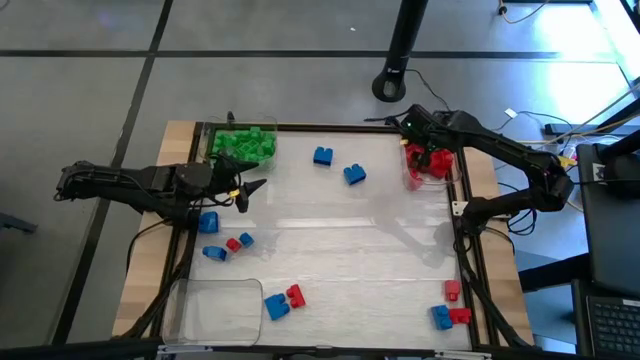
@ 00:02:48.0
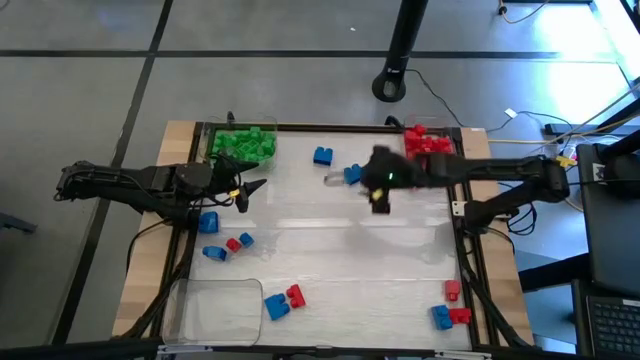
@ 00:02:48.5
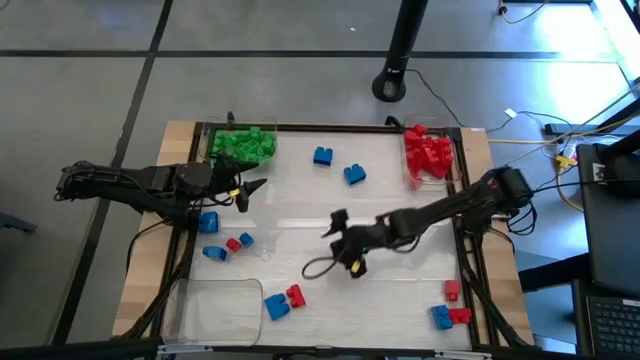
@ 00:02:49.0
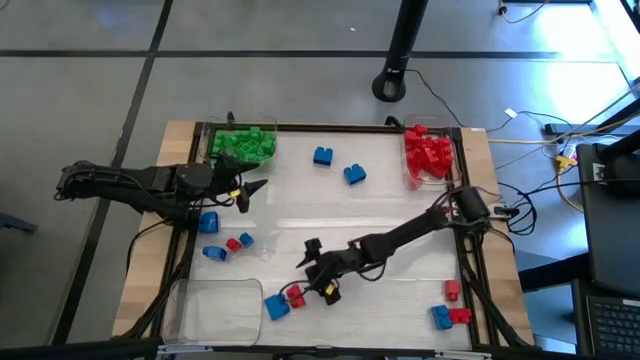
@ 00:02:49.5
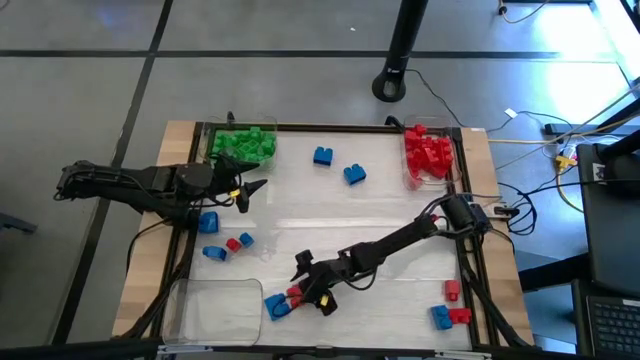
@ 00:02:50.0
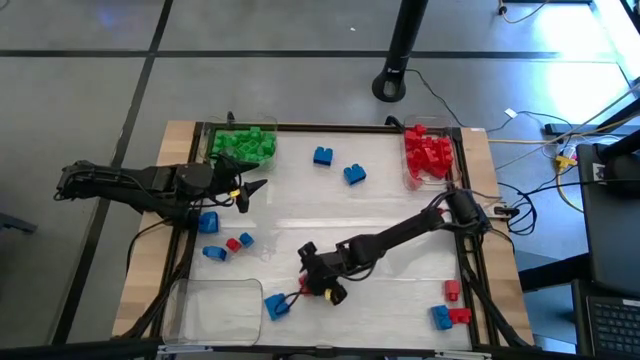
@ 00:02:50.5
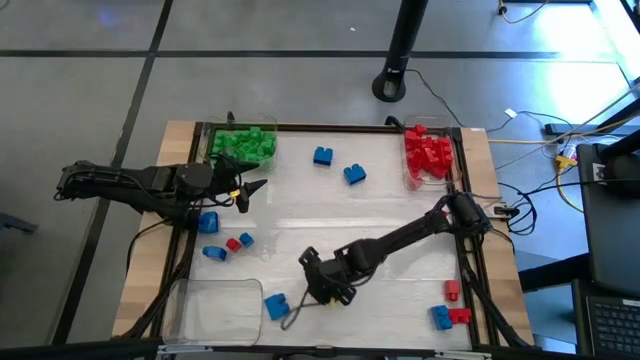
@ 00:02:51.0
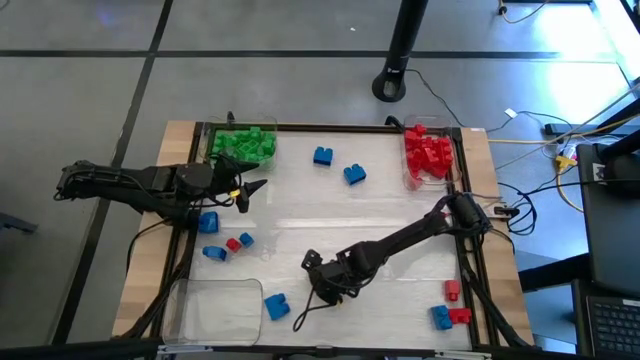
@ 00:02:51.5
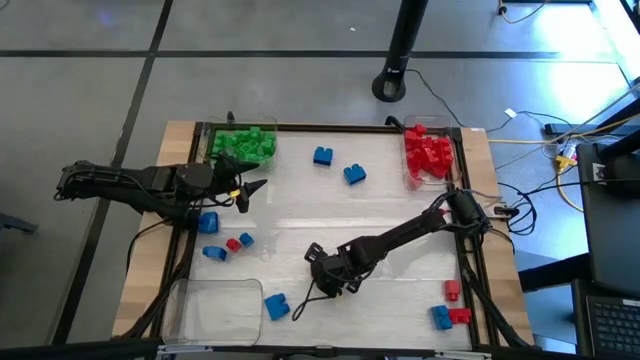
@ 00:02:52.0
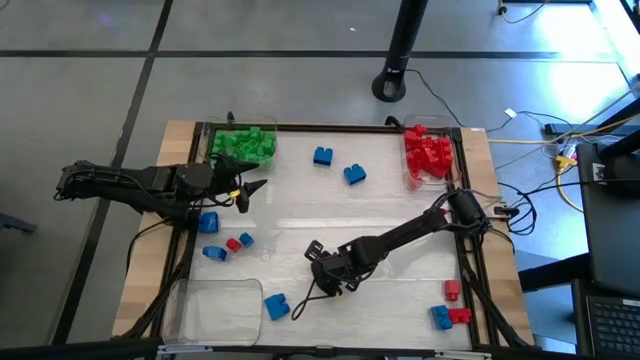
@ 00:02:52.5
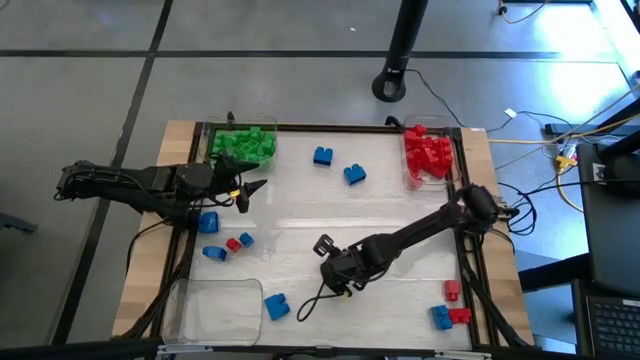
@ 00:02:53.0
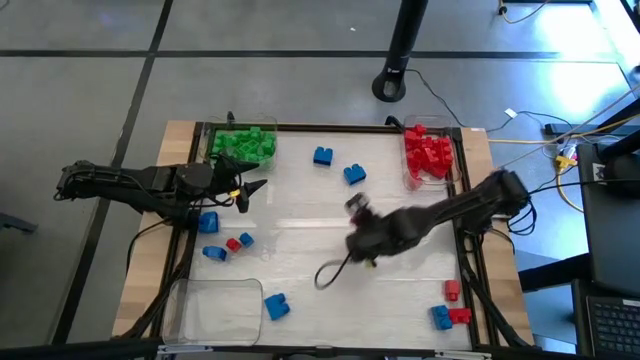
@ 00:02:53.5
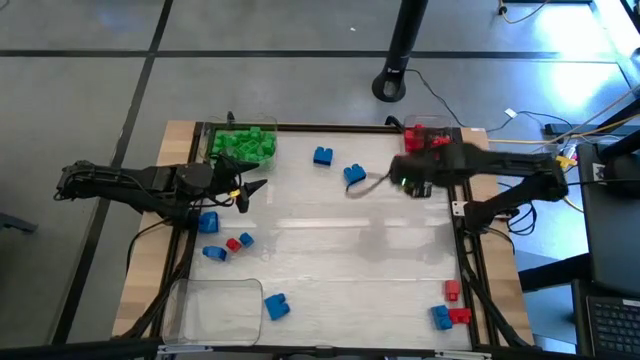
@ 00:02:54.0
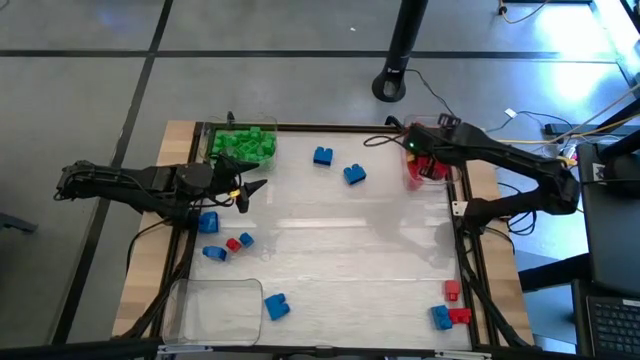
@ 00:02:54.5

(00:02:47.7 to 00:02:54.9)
Task: Sort blocks
Put the red game piece into the right transparent bin

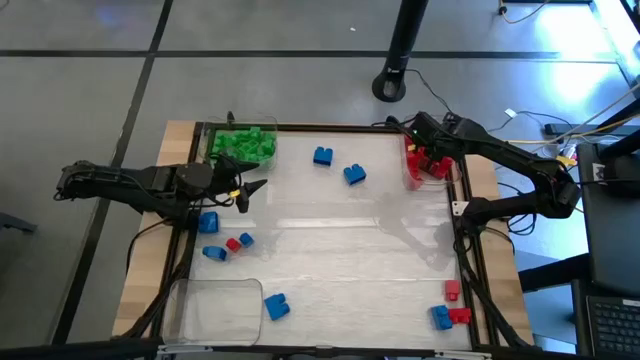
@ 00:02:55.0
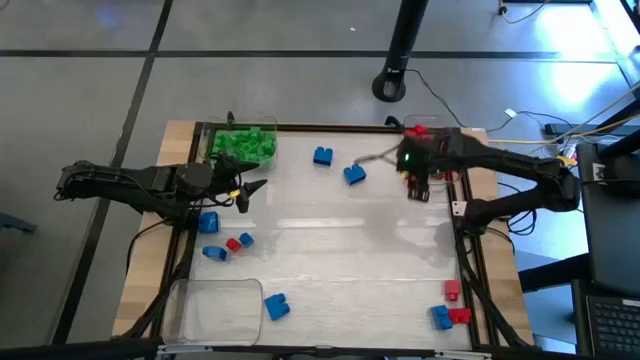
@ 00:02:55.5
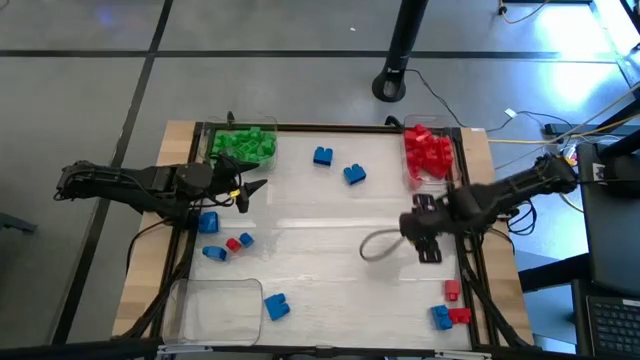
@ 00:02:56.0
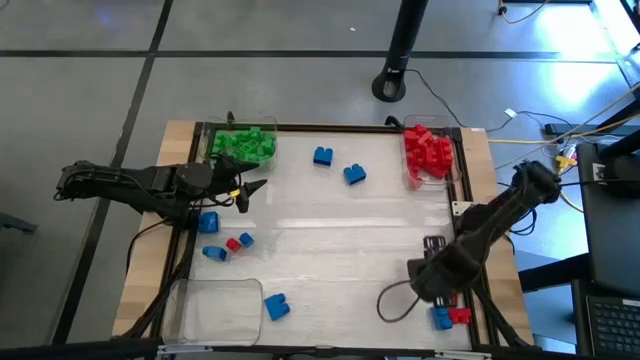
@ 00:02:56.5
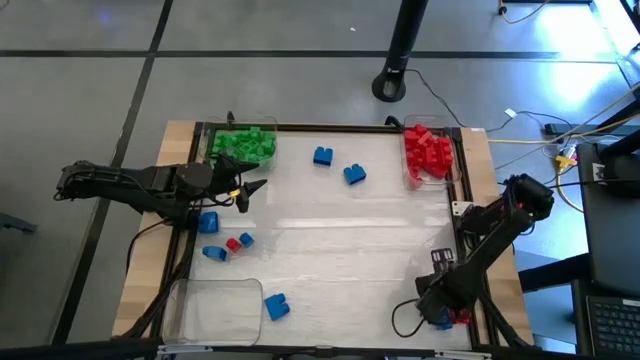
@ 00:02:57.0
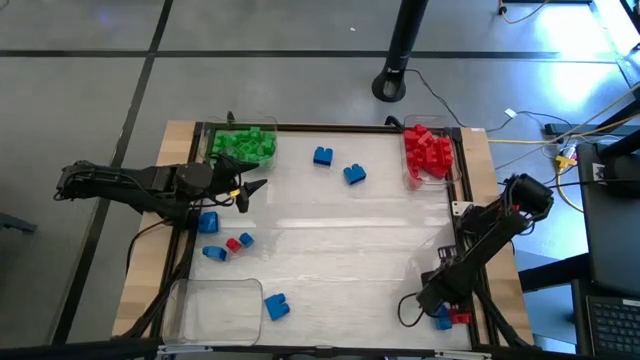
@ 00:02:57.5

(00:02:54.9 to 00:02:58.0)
Put the red game piece into the right transparent bin

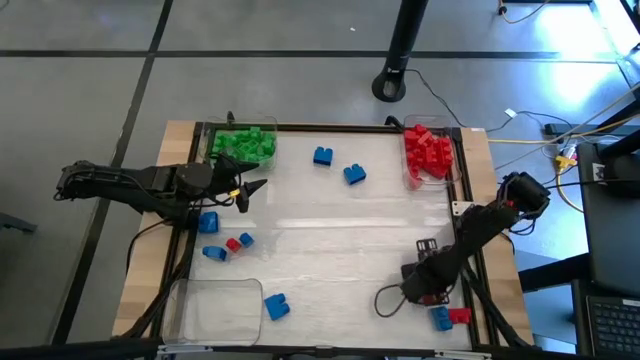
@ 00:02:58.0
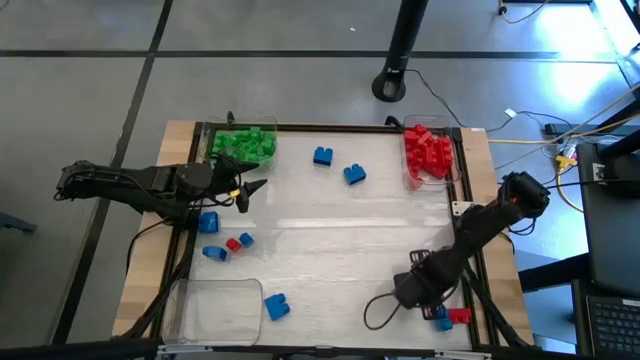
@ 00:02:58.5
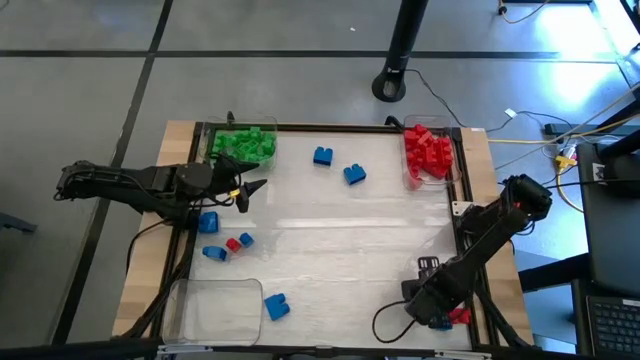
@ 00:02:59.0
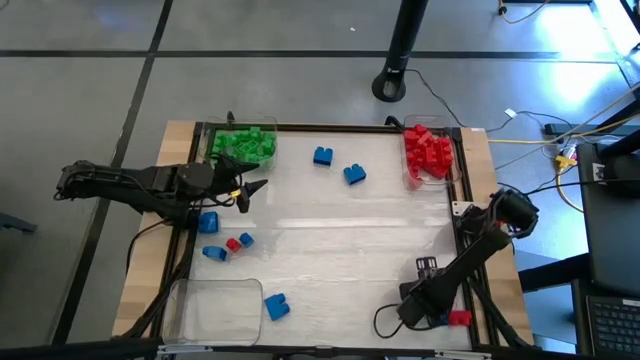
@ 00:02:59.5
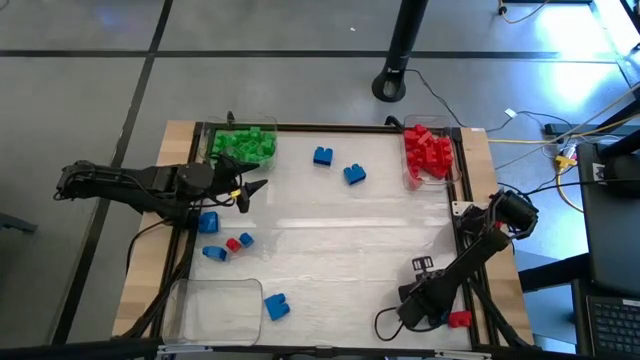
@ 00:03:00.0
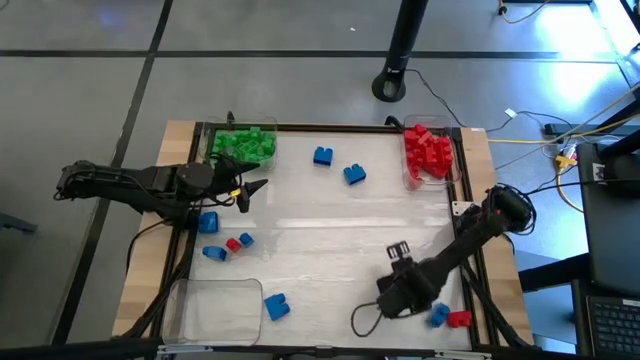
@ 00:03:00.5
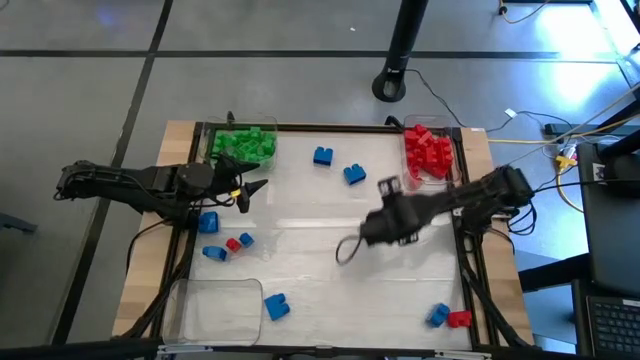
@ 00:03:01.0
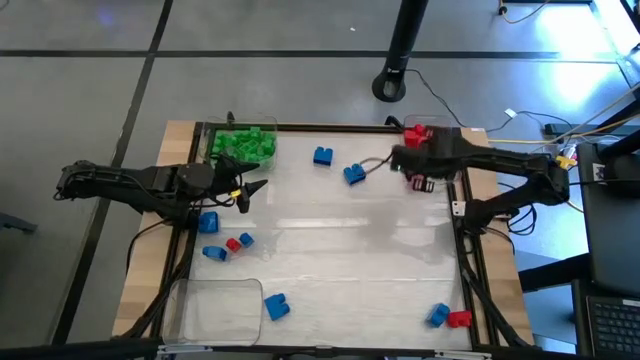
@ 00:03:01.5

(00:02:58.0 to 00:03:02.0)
Put the red game piece into the right transparent bin

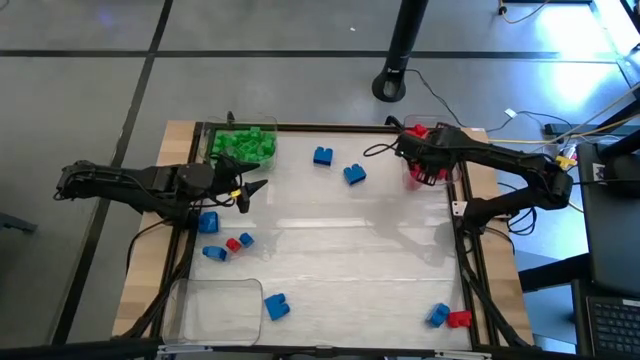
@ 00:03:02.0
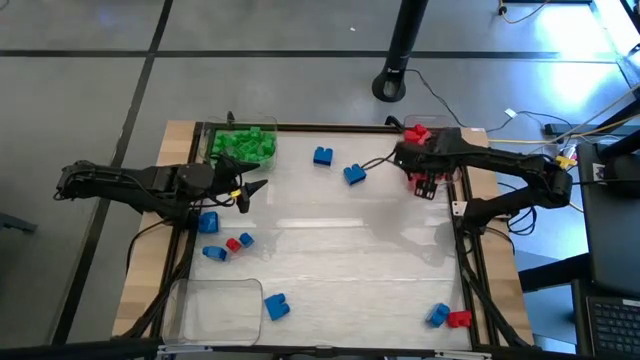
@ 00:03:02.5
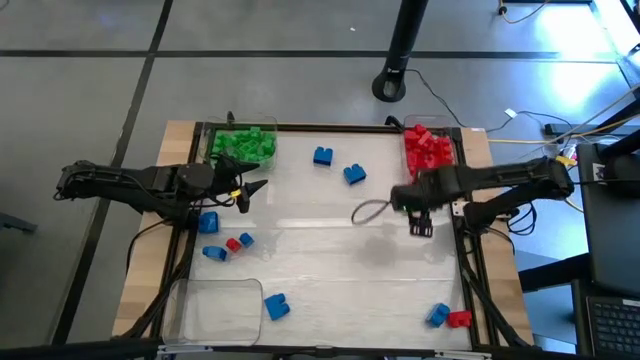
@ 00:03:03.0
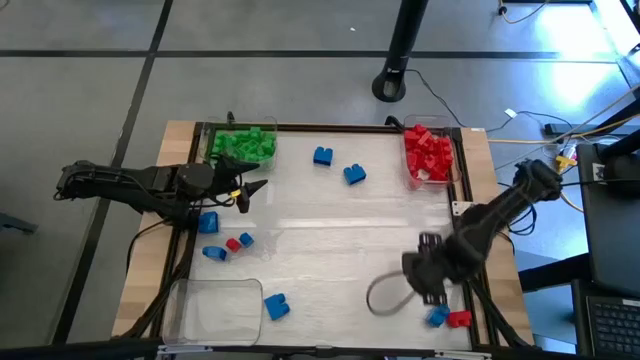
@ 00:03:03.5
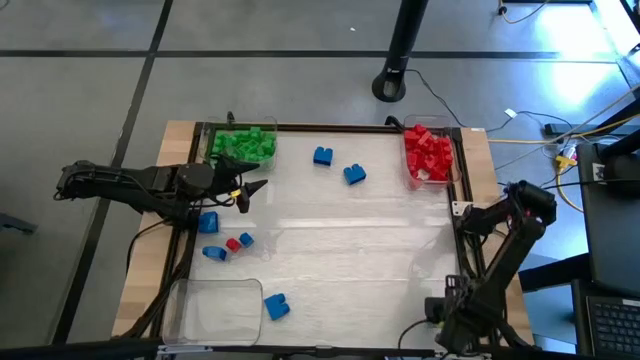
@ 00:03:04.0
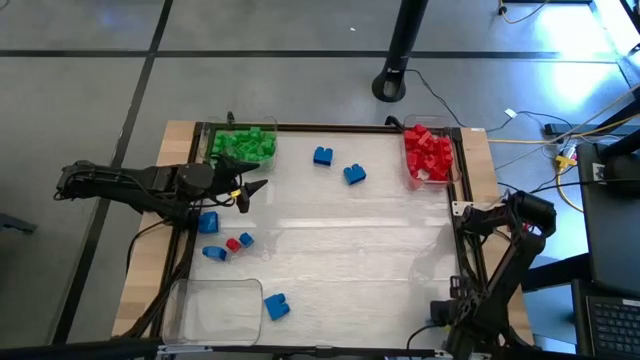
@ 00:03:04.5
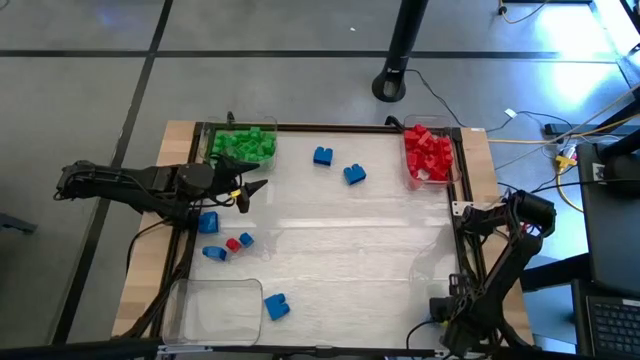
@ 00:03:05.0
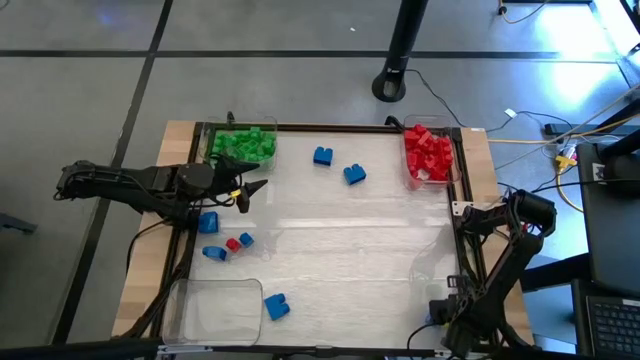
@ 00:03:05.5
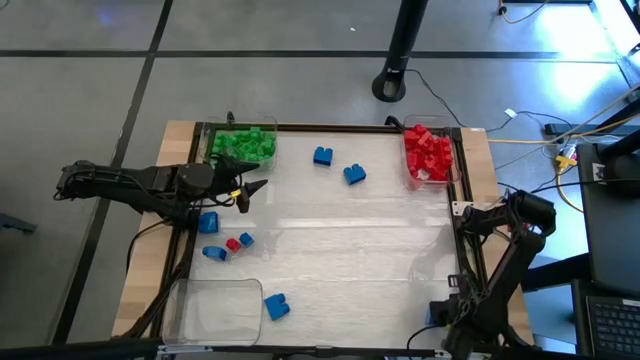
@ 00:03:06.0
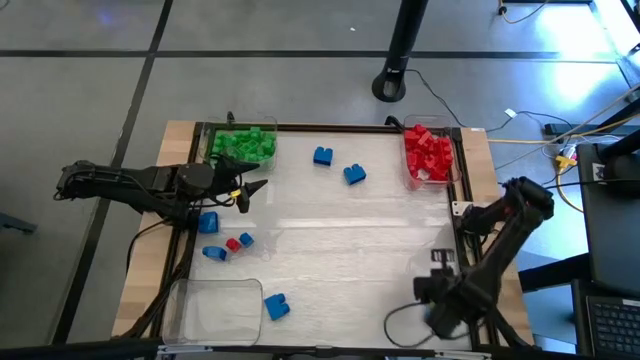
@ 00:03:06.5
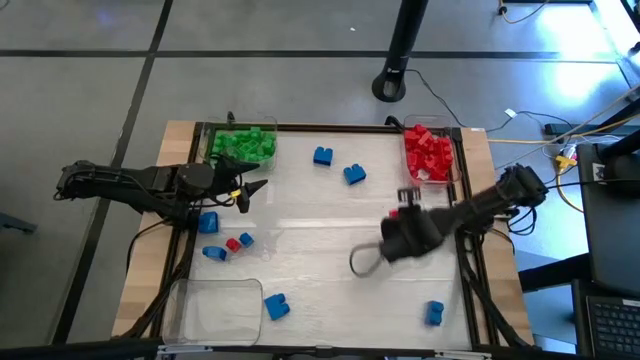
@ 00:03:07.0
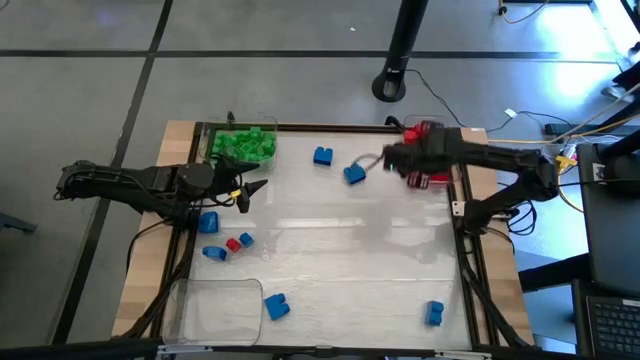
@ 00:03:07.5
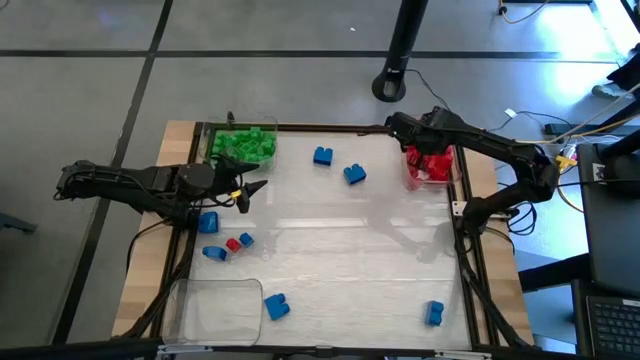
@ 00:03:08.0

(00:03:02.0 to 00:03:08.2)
Put the red game piece into the right transparent bin
